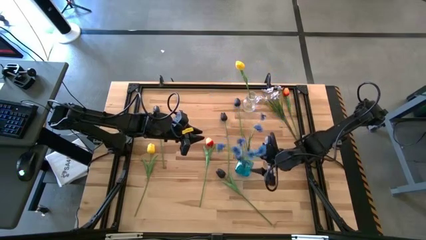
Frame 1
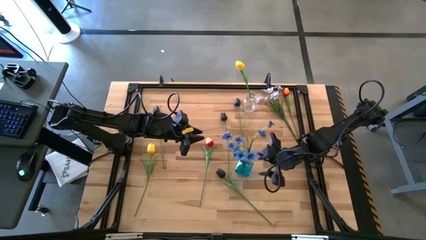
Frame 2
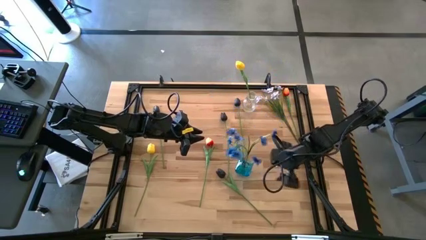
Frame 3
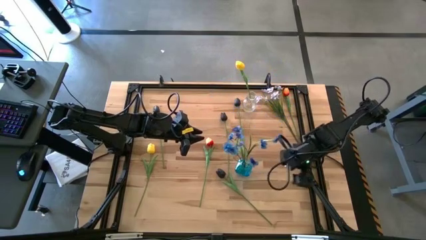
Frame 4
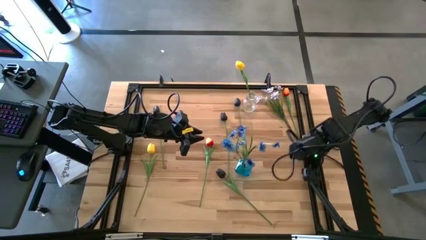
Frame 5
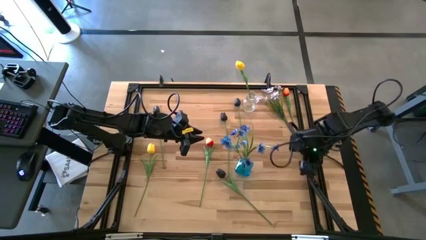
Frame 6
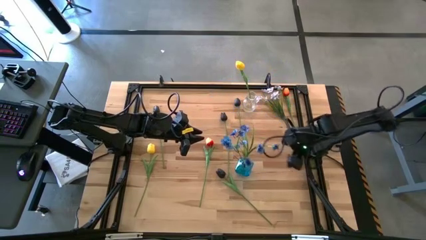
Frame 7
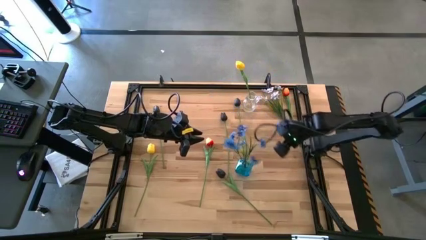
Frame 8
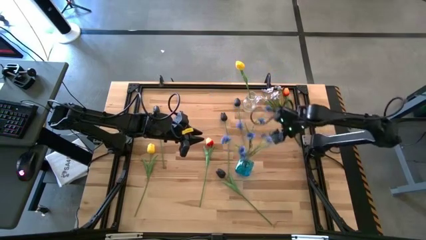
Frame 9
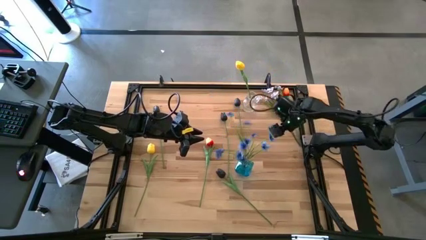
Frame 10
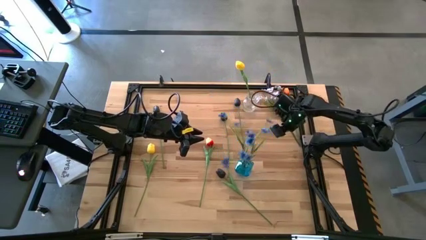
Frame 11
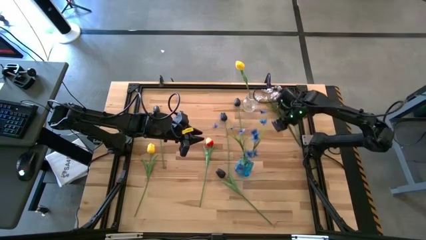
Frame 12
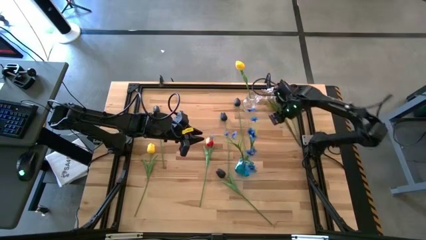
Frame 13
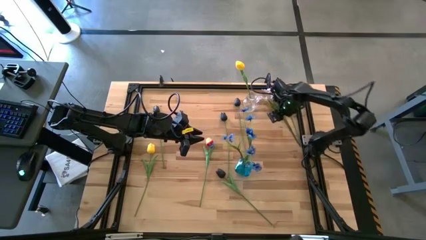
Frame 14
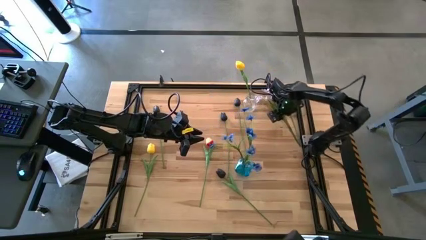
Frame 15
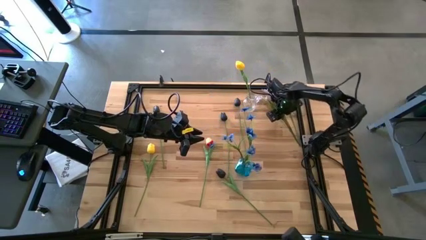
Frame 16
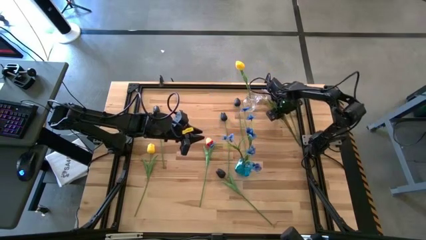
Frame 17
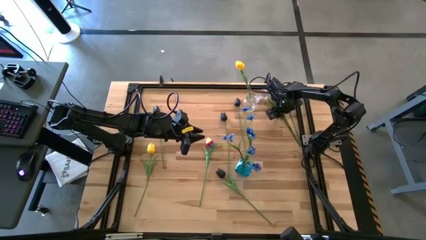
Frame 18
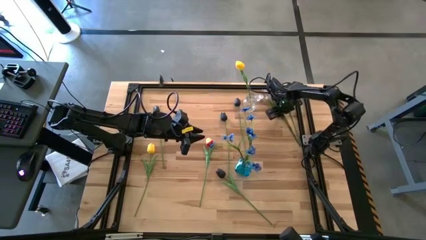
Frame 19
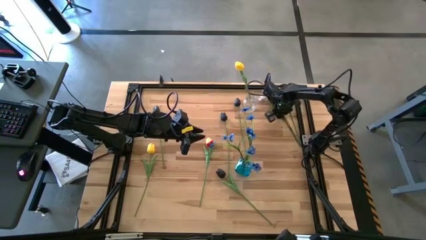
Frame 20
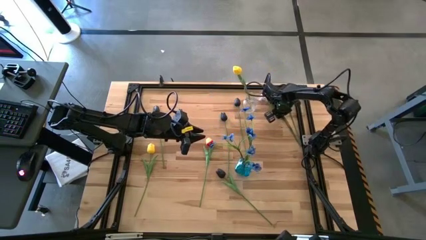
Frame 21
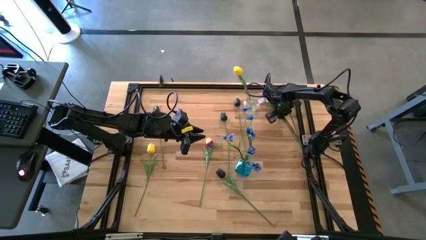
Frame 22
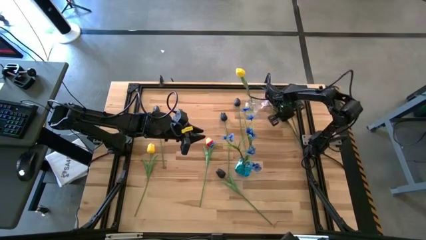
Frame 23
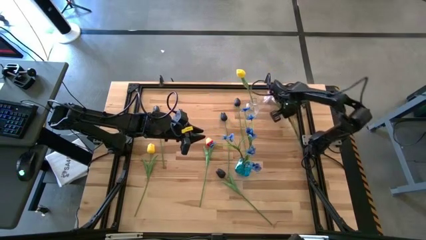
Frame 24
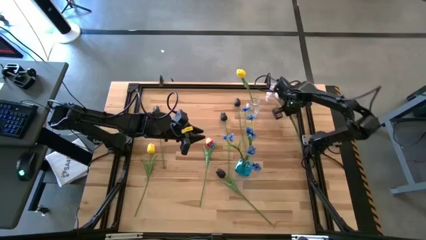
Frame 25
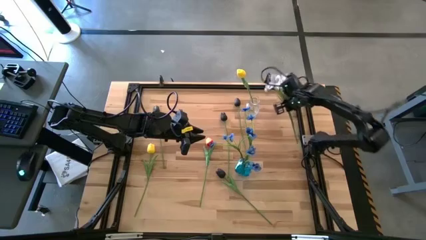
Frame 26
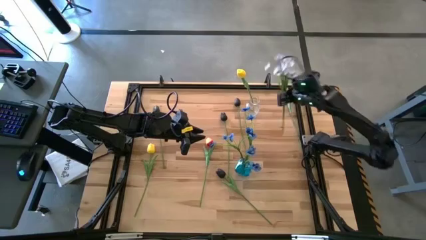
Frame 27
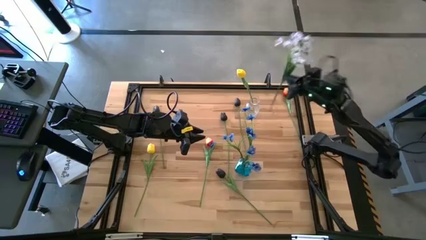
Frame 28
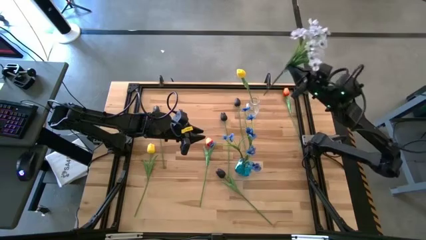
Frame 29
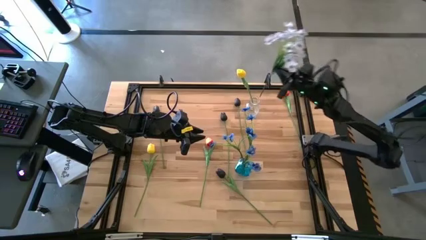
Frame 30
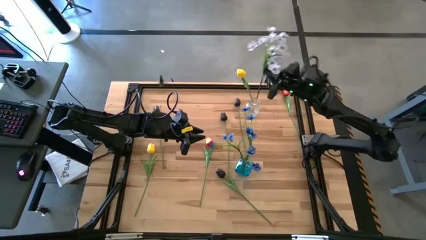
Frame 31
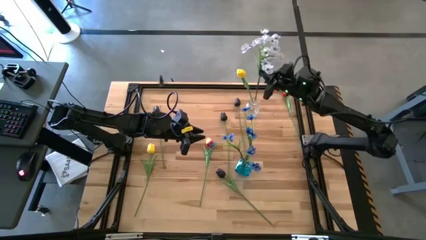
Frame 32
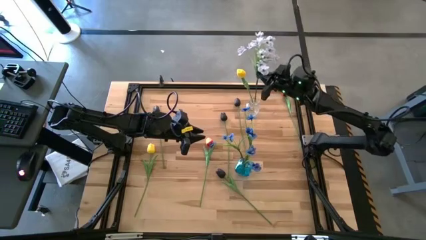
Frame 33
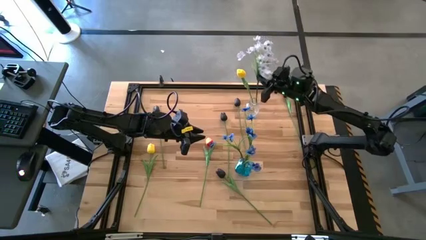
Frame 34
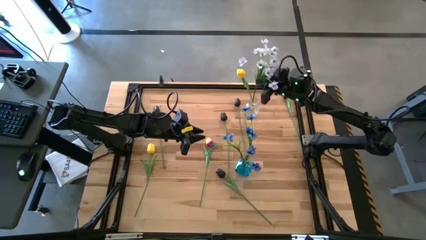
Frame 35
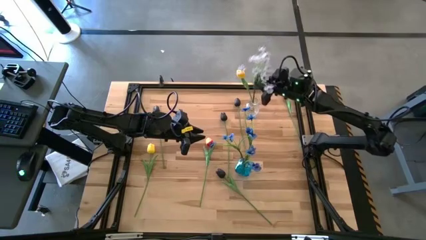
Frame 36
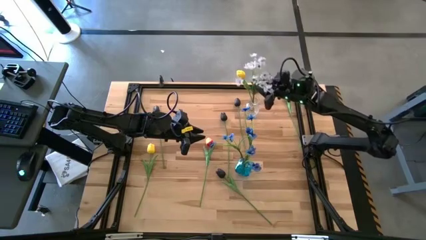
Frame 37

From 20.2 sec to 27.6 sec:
Task: Sort flowers into vase by color
Put the white flowers into the transparent vase

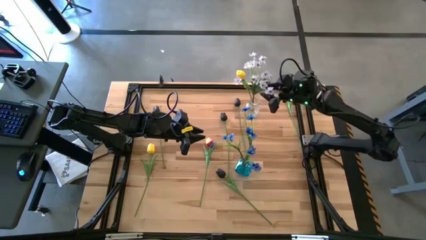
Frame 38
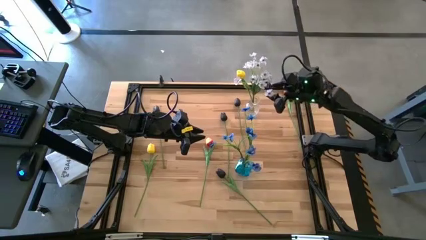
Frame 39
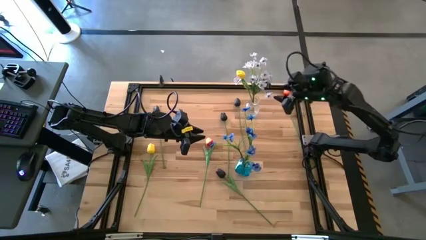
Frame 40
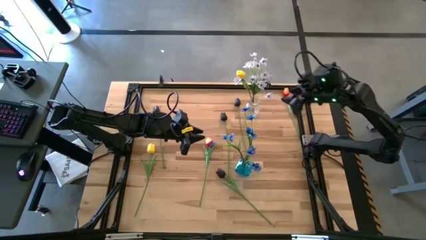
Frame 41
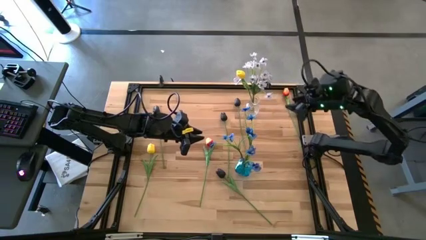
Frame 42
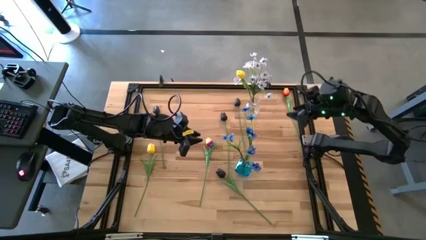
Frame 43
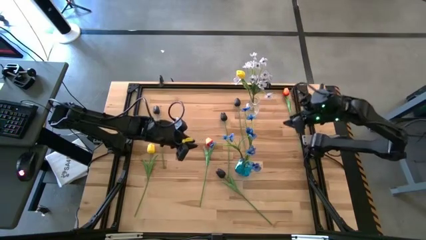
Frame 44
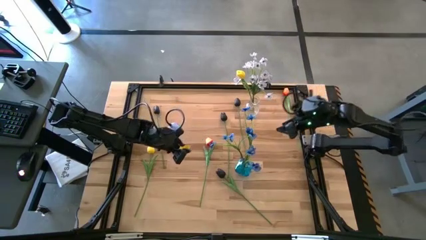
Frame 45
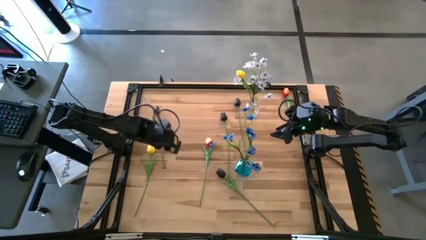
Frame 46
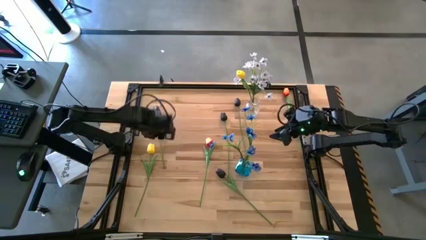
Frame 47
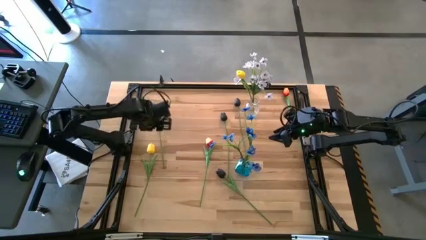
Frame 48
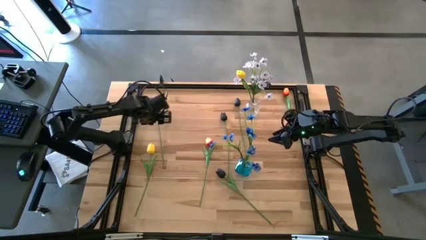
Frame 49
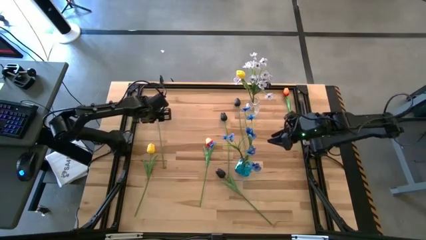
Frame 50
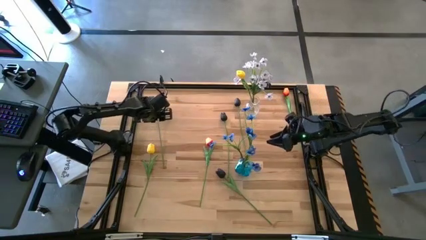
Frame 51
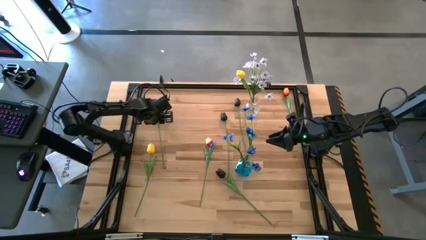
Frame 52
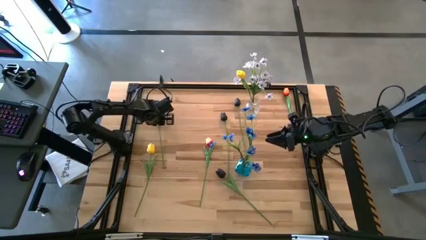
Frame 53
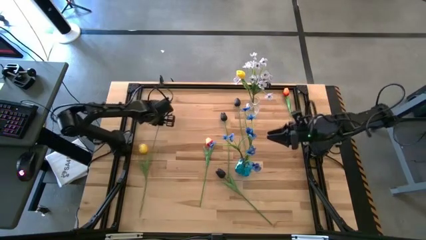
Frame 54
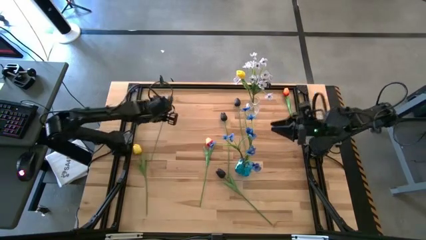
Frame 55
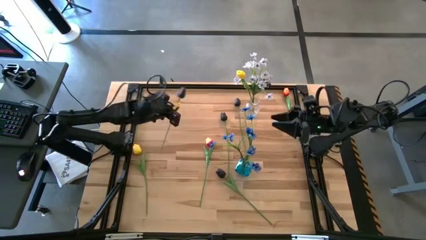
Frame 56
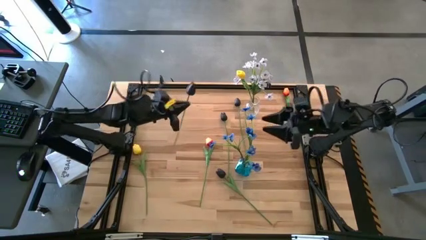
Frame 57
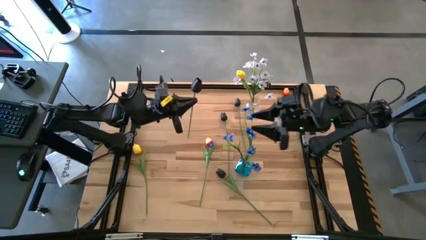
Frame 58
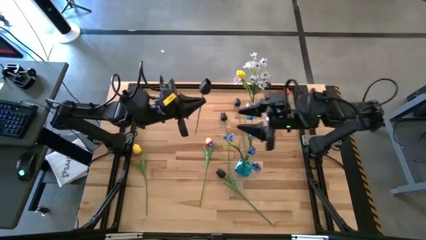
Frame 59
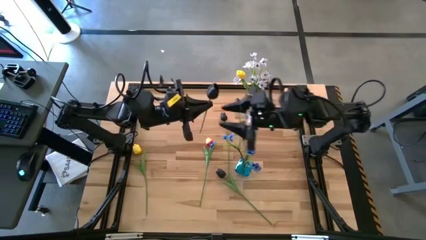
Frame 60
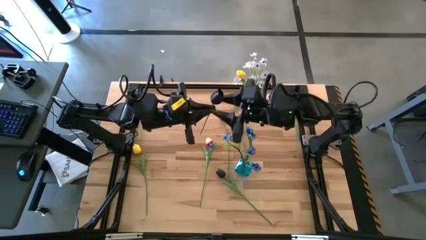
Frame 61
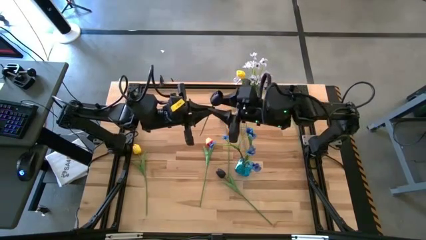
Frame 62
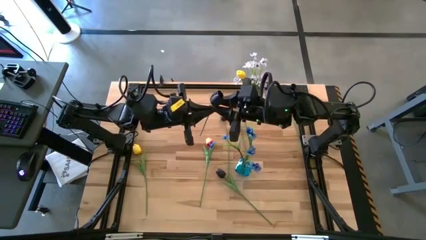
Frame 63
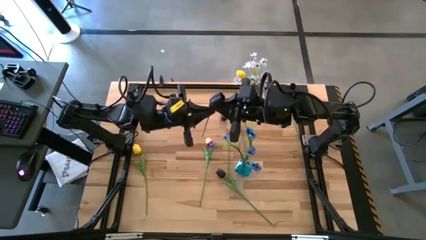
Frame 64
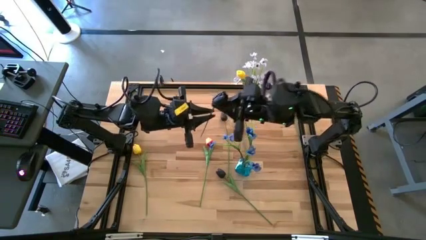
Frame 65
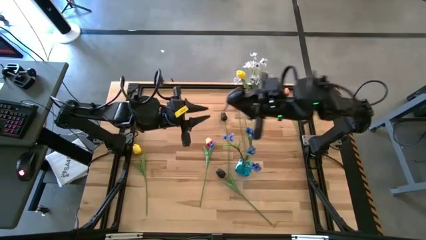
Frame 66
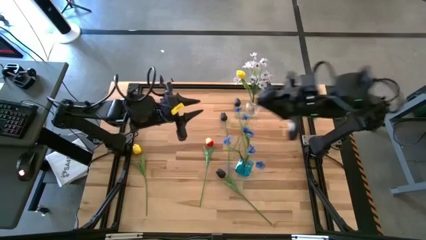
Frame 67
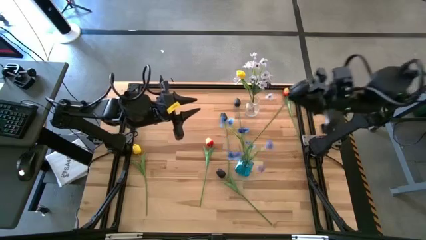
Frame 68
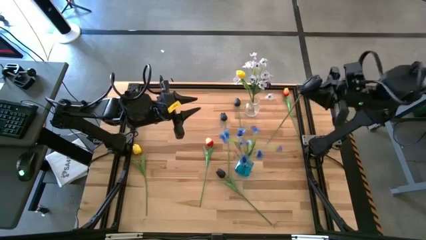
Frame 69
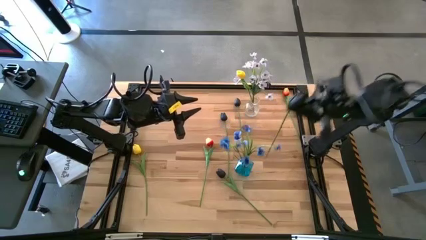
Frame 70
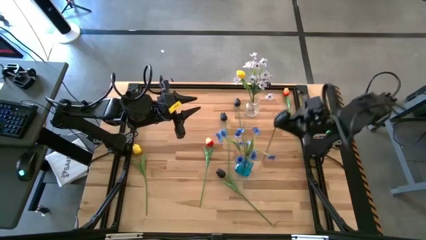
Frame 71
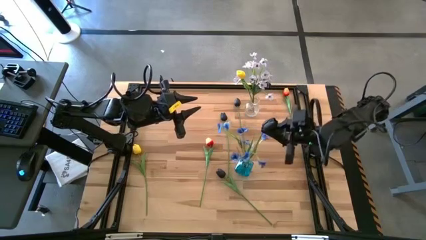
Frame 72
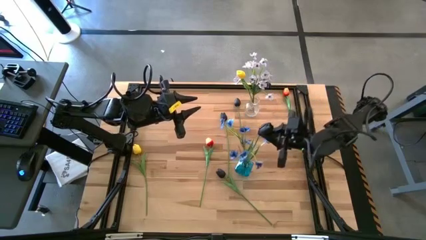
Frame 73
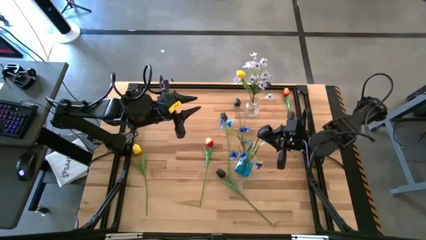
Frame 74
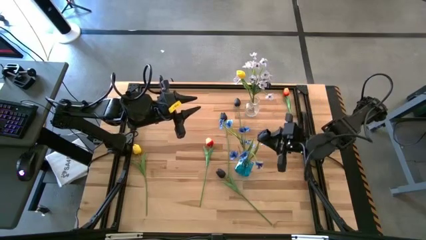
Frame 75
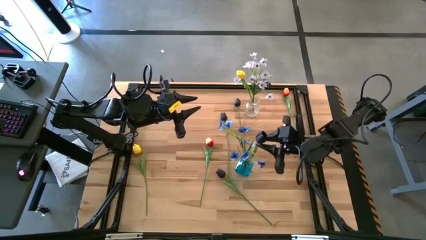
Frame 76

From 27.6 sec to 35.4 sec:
Put the black flower into the blue vase
